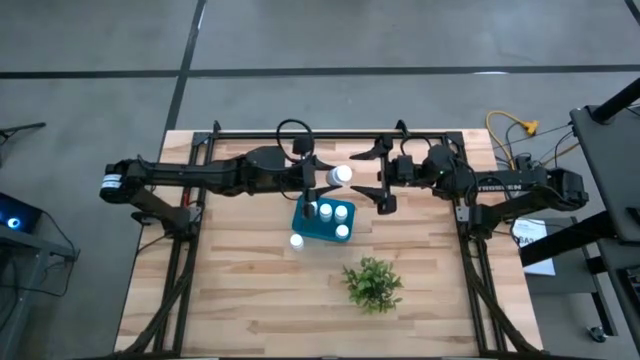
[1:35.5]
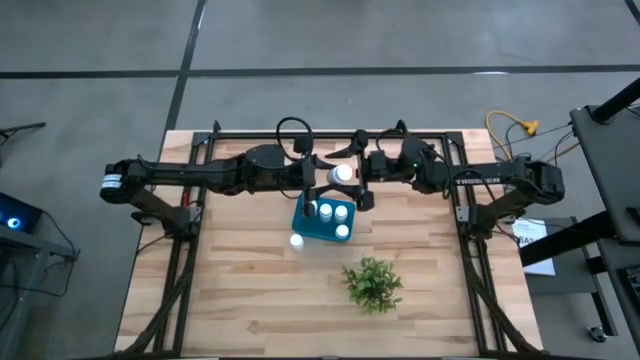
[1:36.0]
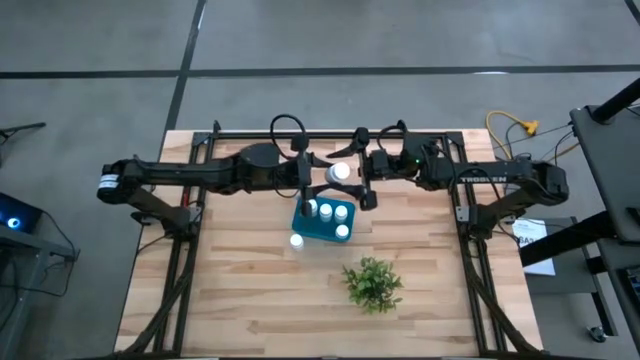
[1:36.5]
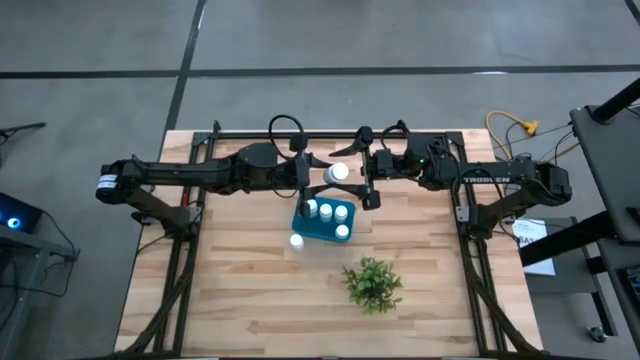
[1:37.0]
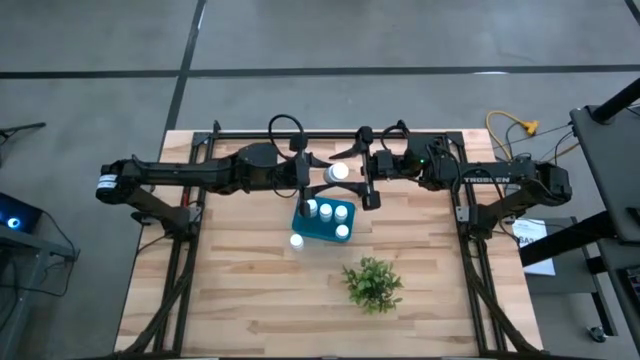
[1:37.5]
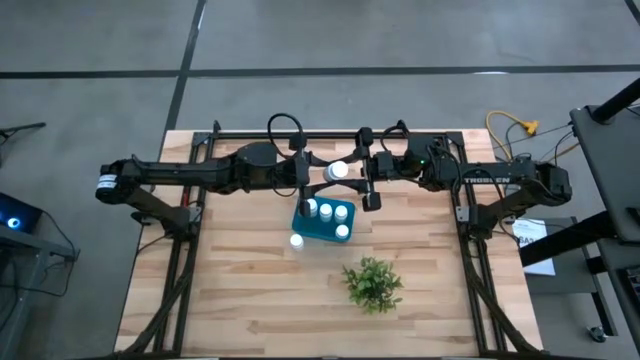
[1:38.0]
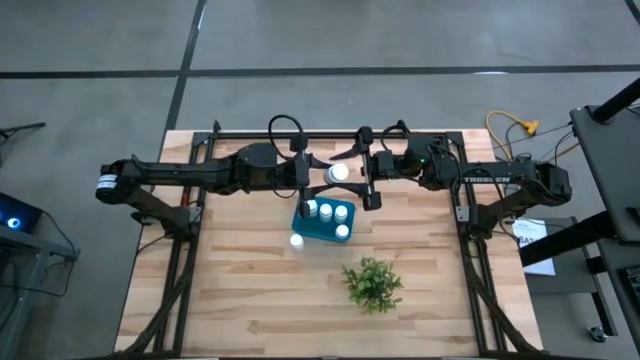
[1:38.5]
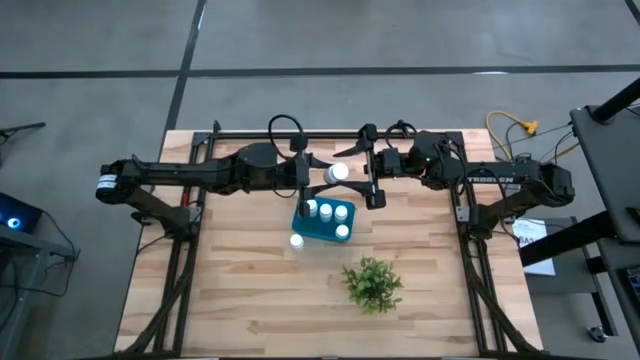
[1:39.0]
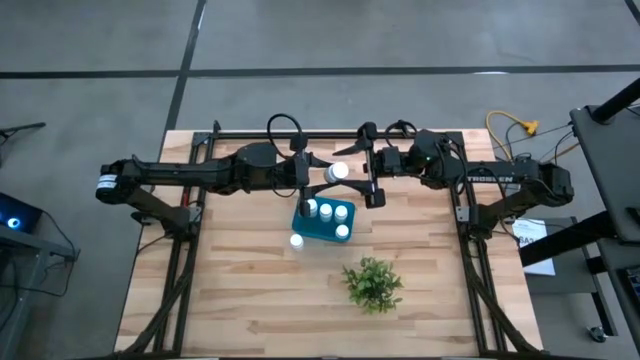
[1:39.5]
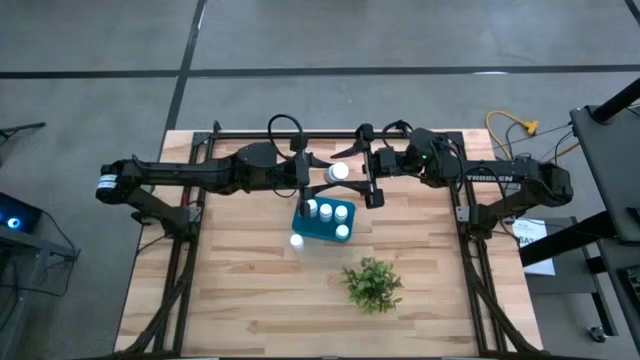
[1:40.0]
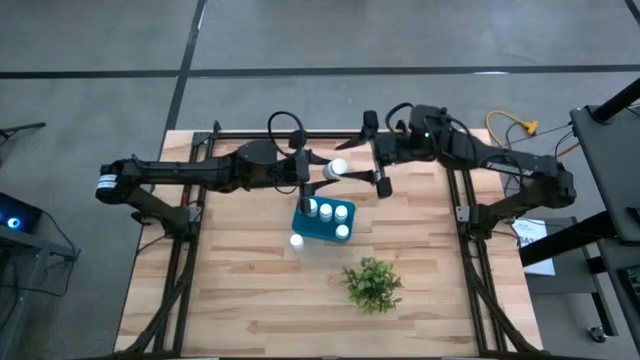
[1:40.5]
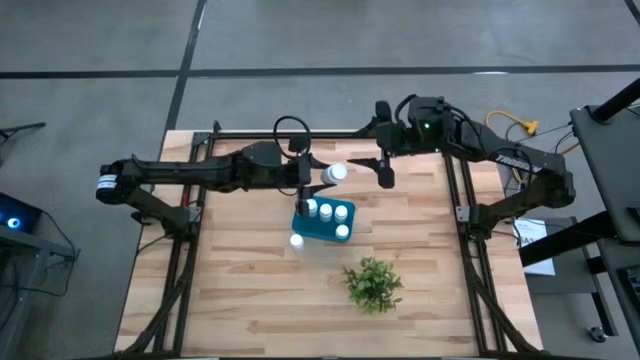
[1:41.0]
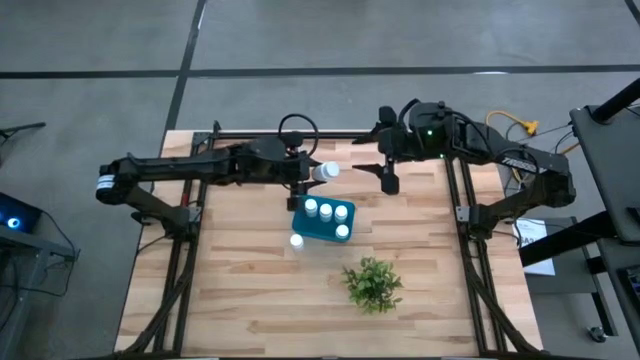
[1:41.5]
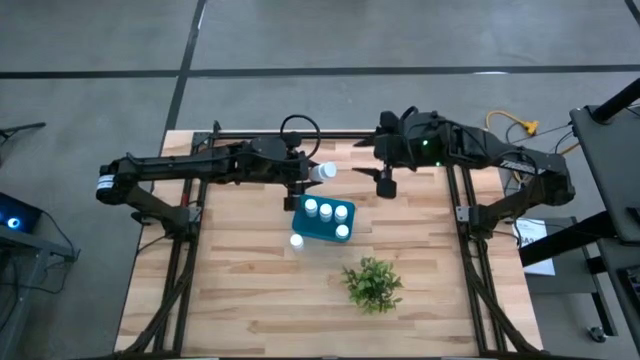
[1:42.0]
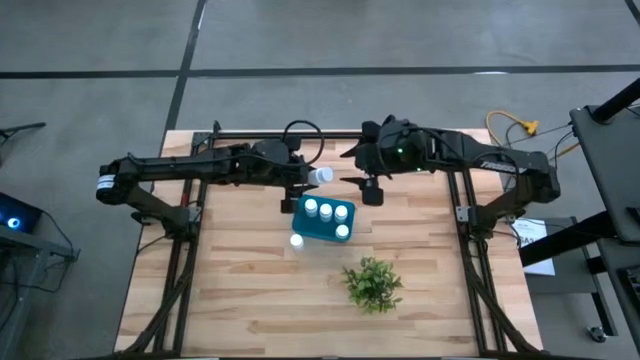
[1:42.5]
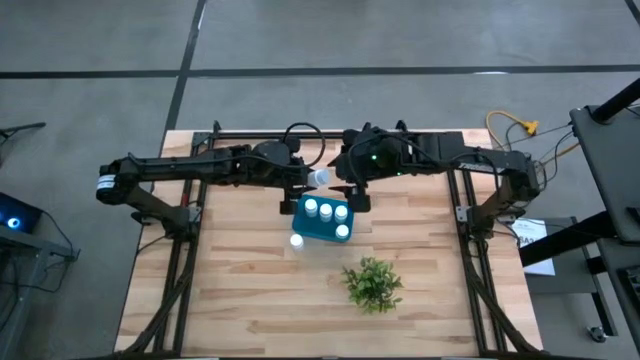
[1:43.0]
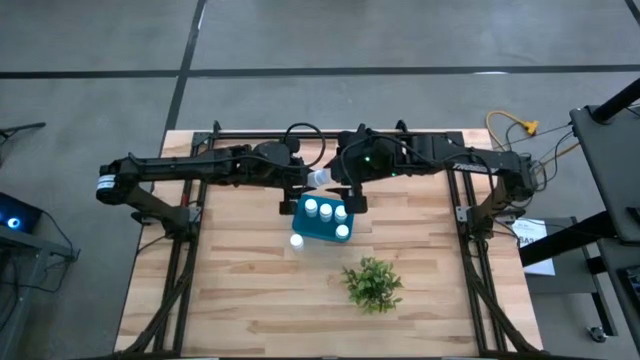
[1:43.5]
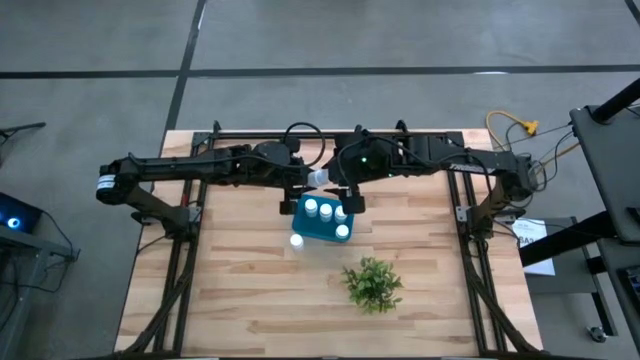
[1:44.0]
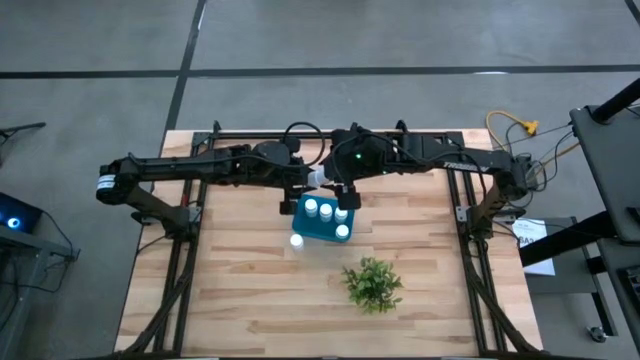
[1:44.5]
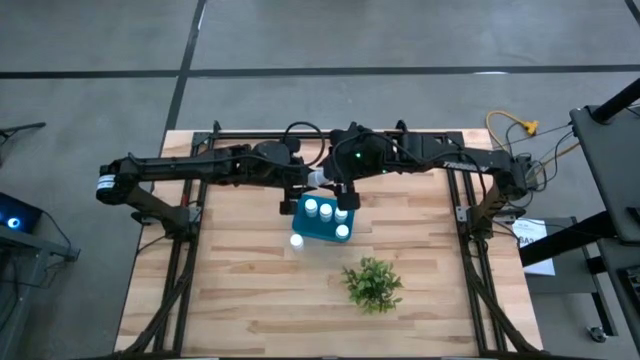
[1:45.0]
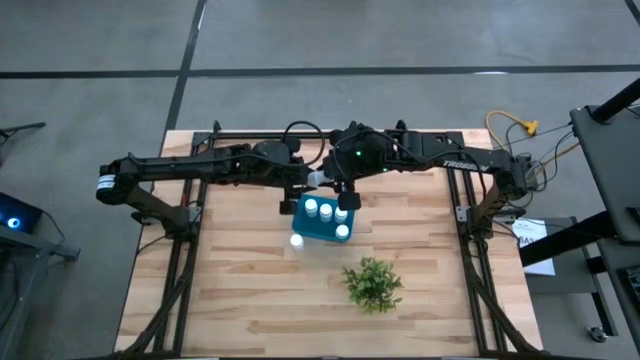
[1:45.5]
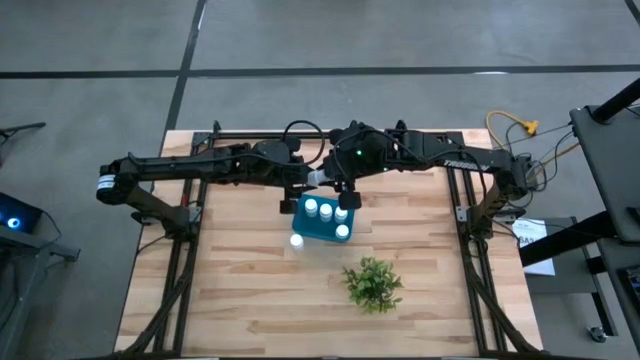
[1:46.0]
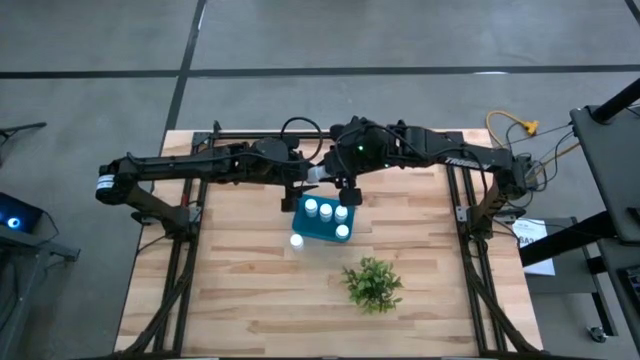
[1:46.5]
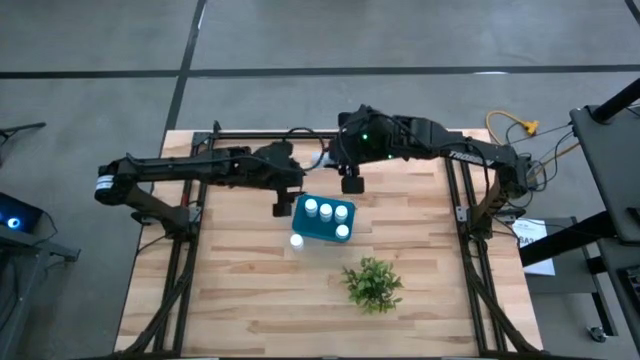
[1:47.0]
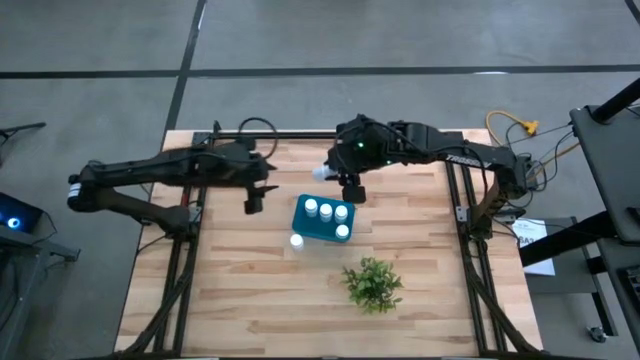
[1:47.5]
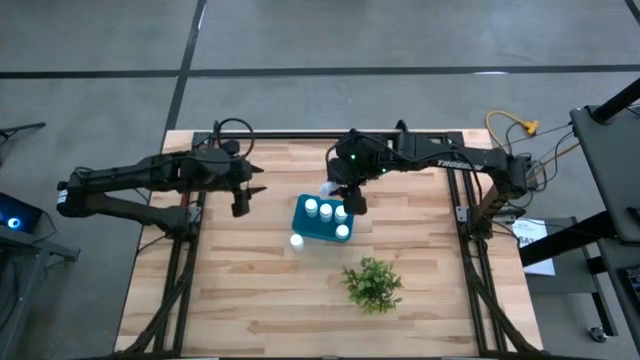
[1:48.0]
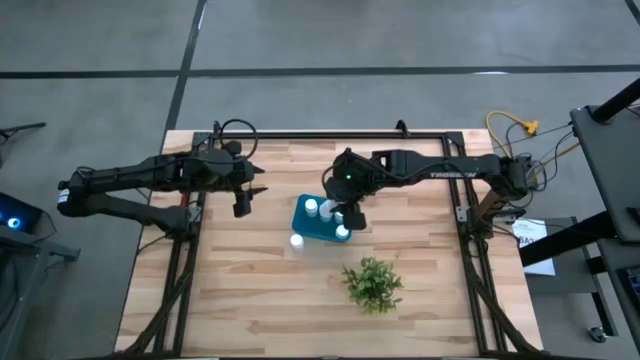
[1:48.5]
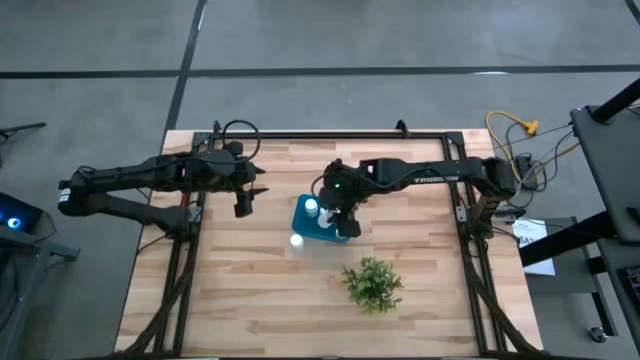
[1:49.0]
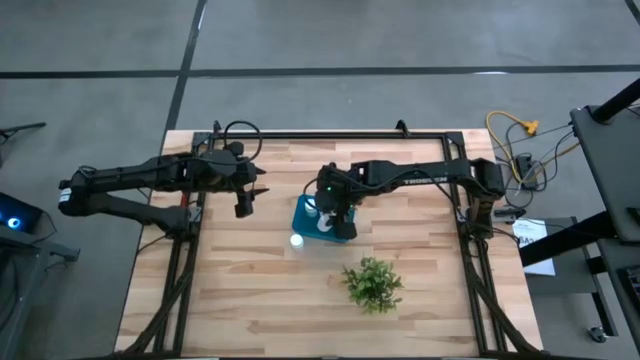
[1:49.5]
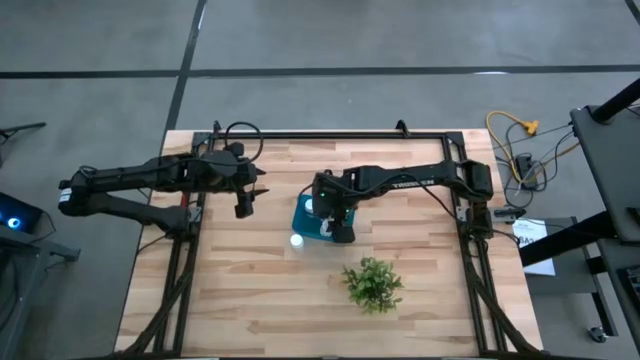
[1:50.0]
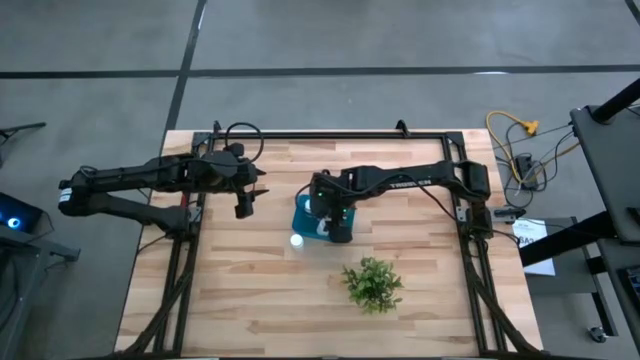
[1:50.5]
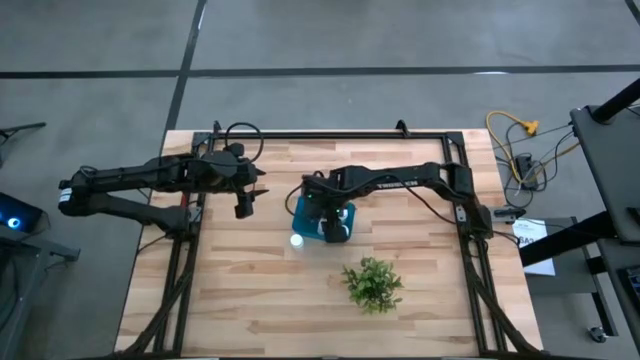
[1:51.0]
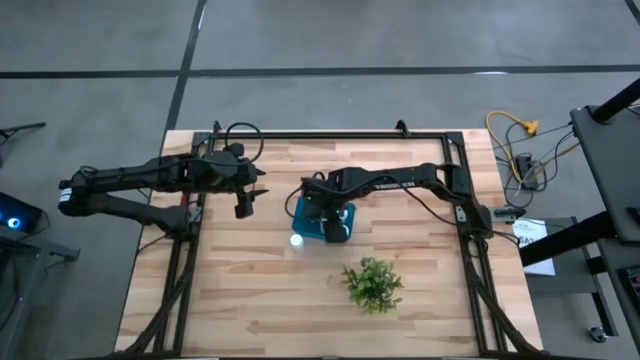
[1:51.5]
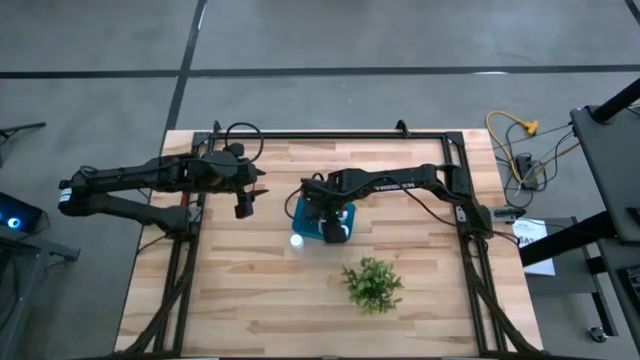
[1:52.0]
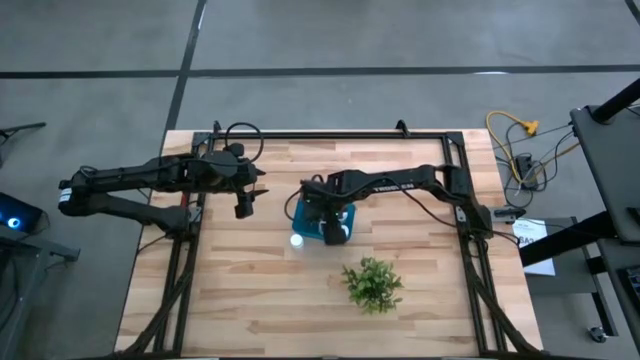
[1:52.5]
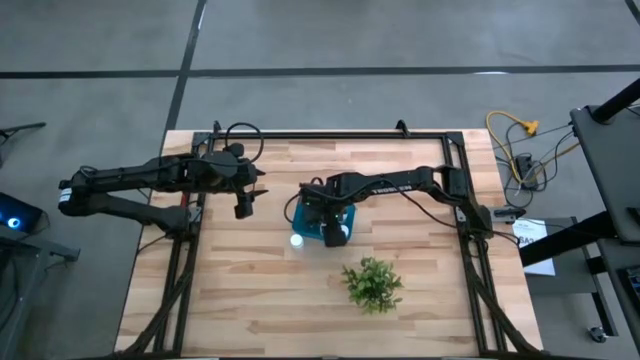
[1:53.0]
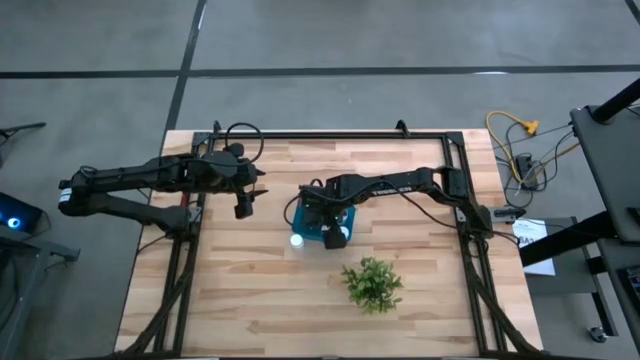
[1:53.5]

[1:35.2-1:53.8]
Task: Pick and place pill bottles into a basket
Put the white pill bottle in the blue bin

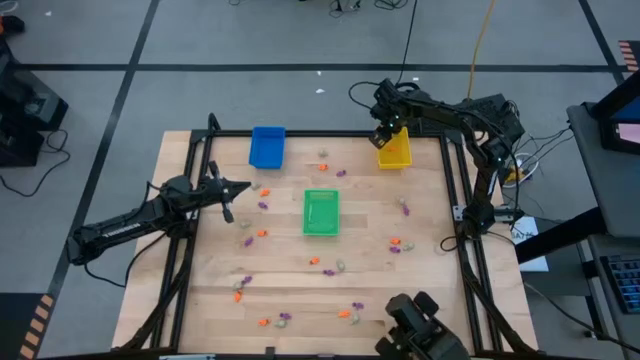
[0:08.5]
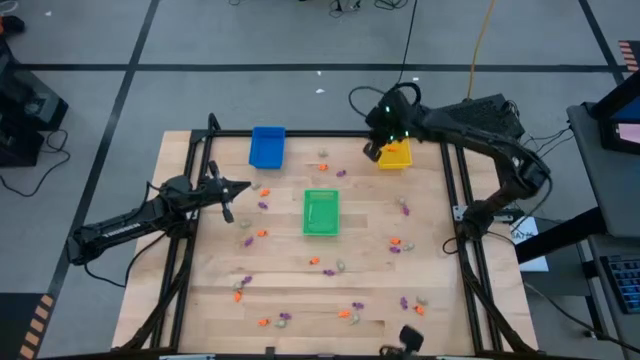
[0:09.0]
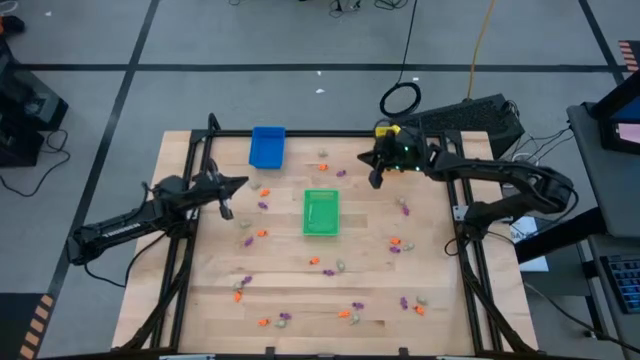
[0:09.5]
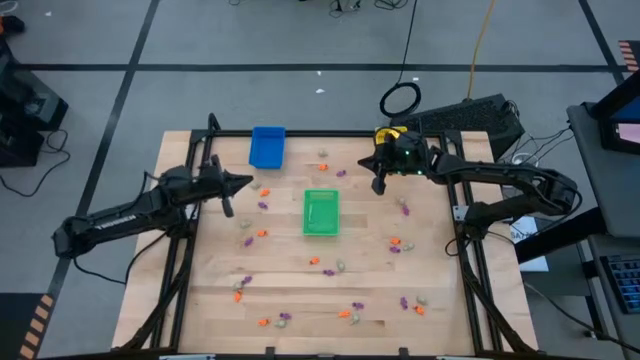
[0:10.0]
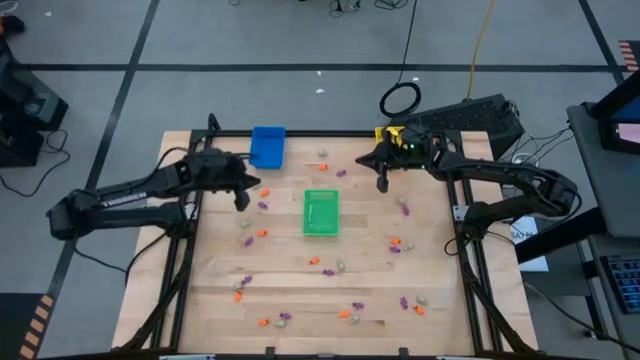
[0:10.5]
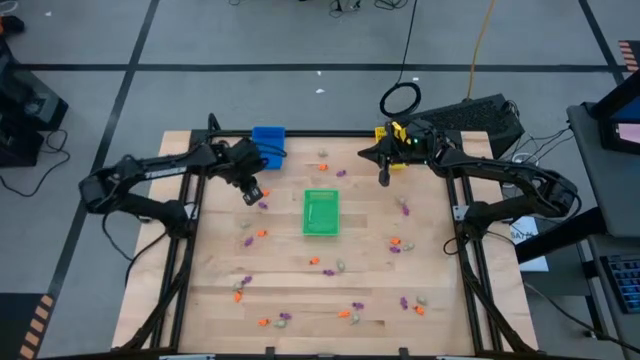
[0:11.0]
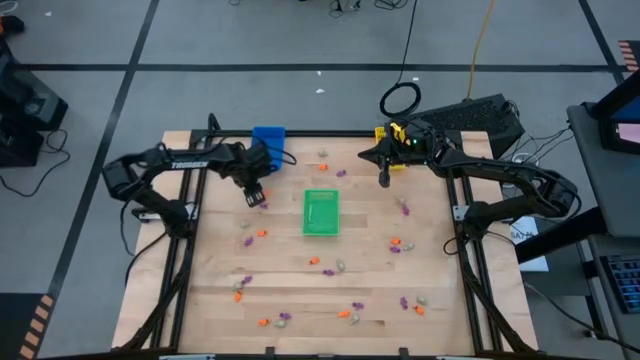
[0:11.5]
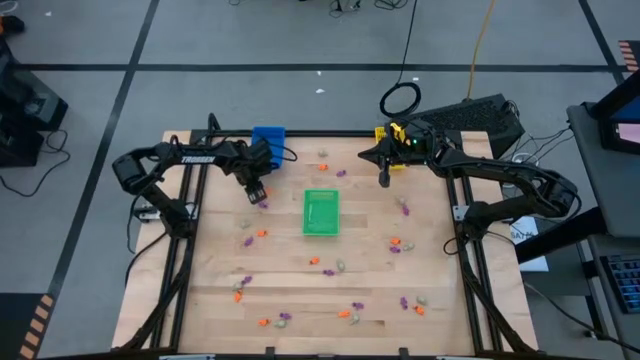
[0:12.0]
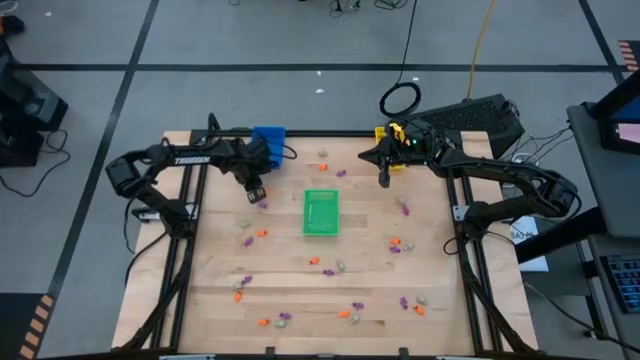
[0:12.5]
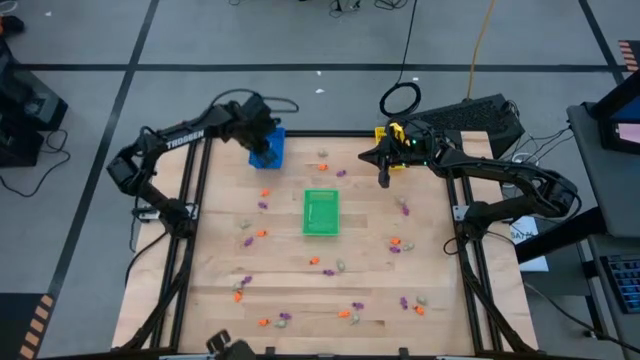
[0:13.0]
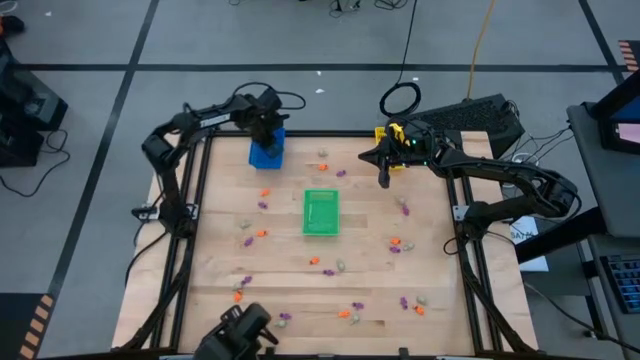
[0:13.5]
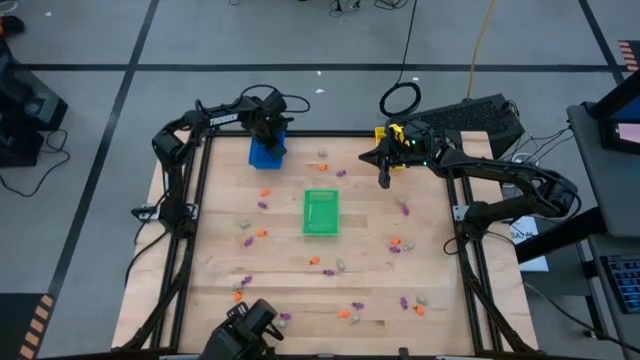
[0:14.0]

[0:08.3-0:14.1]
Task: Sort Halloween decoration
Put the white skull toy into the blue bin
